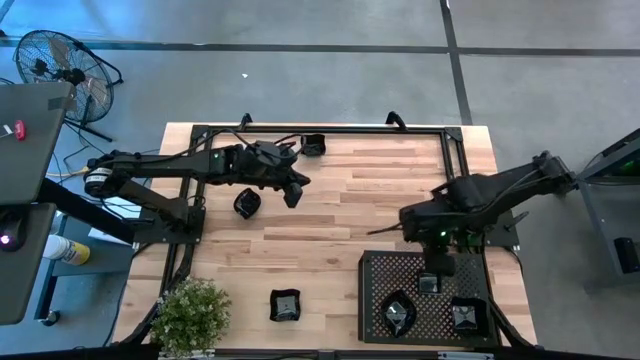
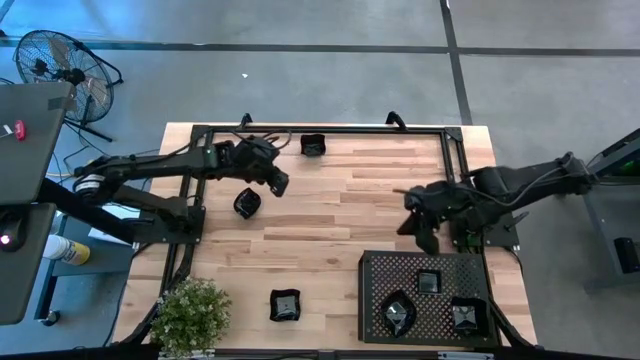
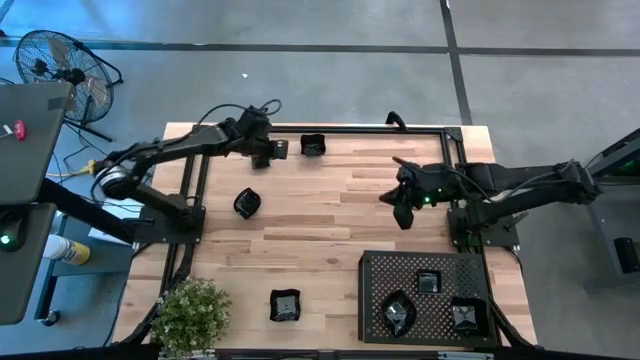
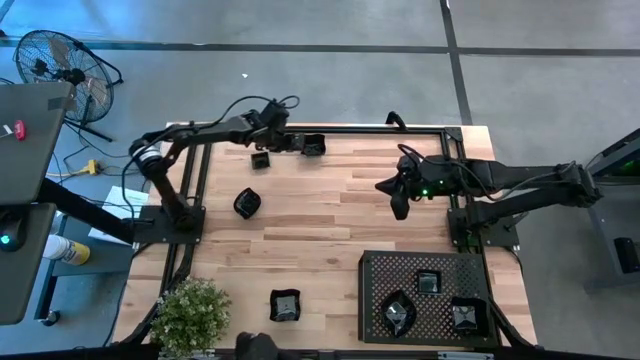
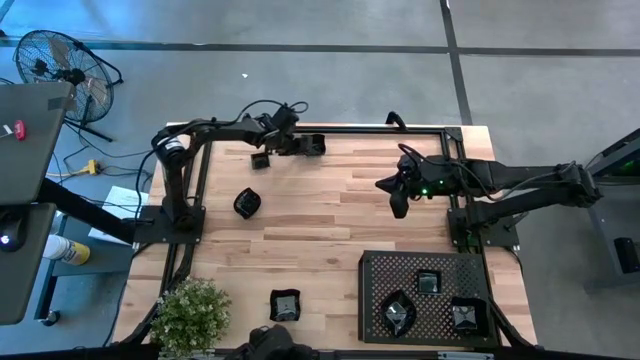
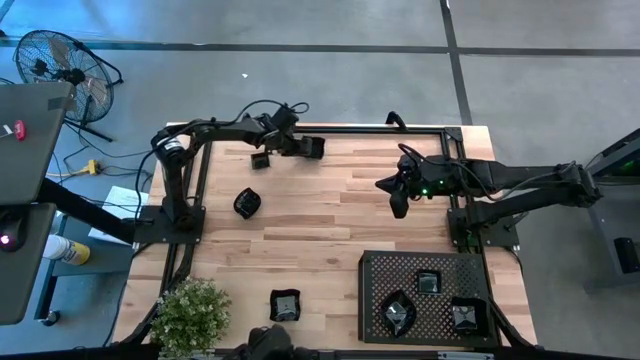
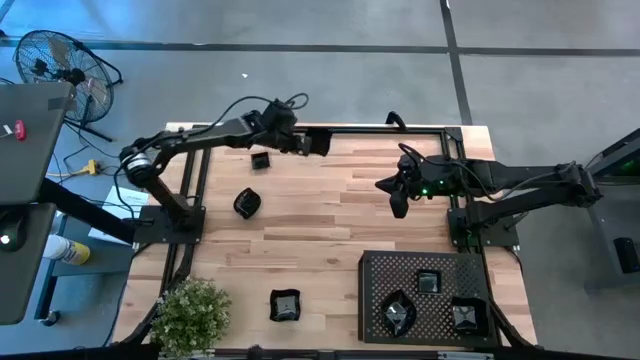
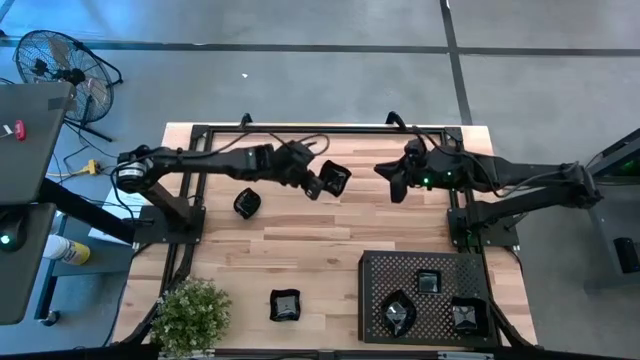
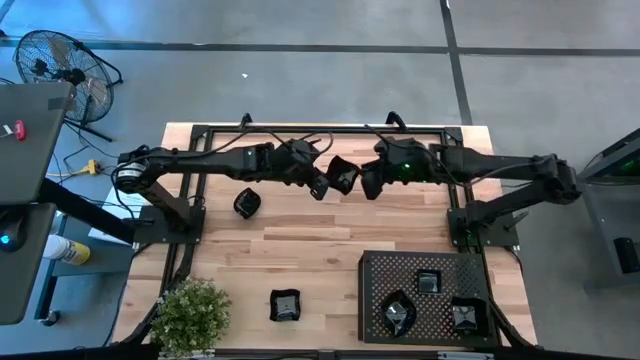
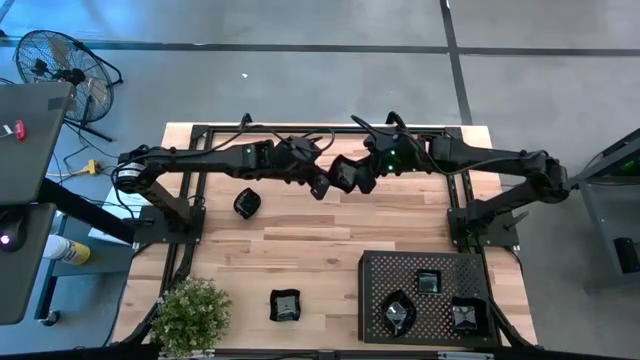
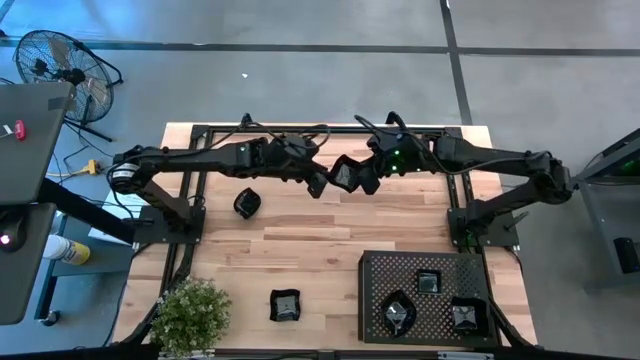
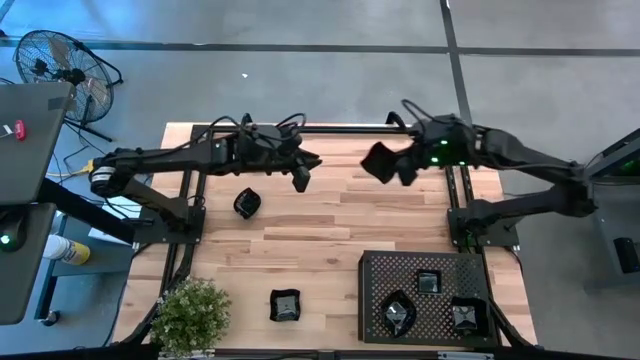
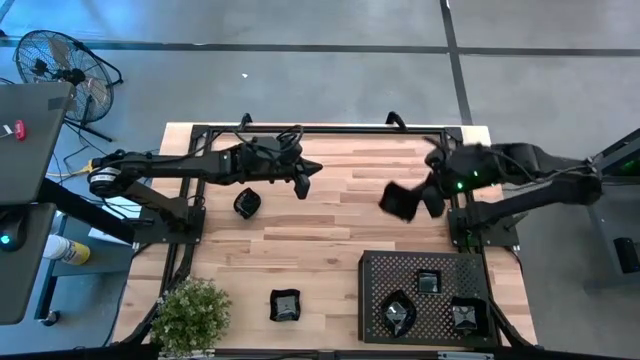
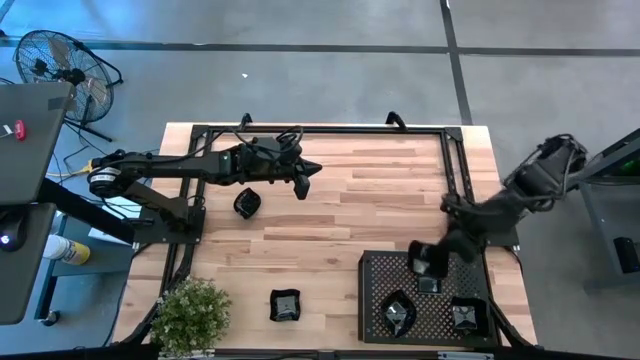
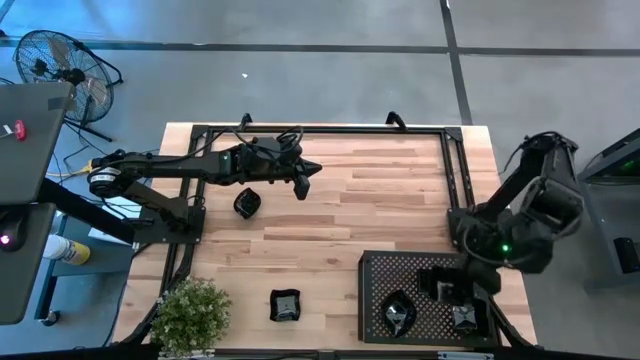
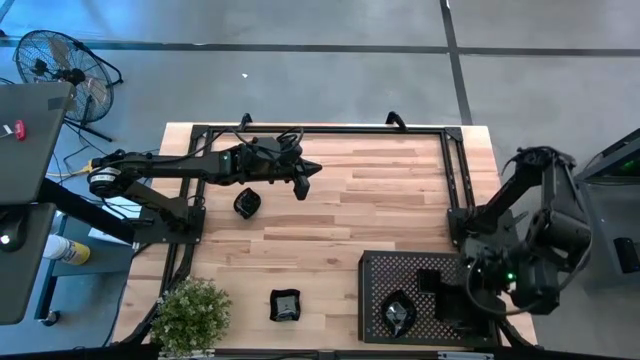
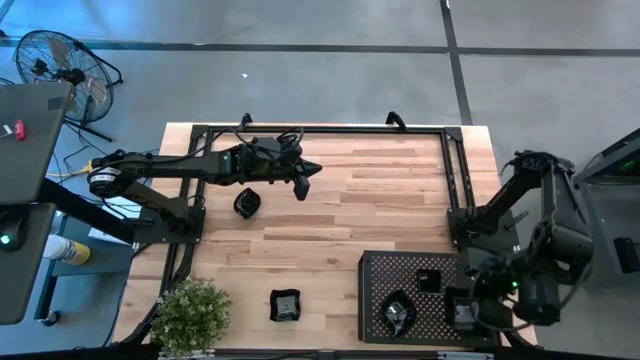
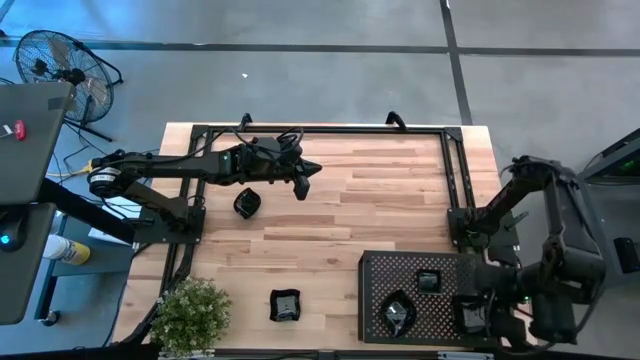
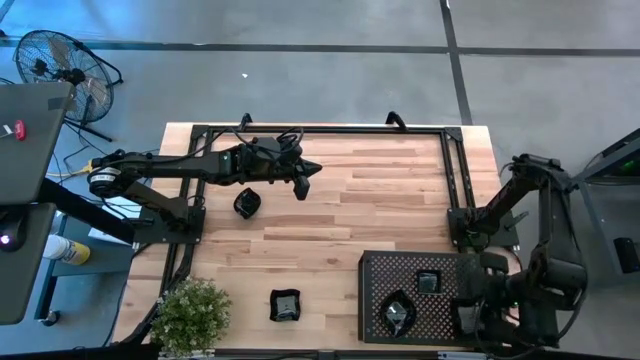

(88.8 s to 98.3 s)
Task: Pick & Place Mini shaped plates
Stack the black distorted square plate on top of the black distorted square plate on the shelf

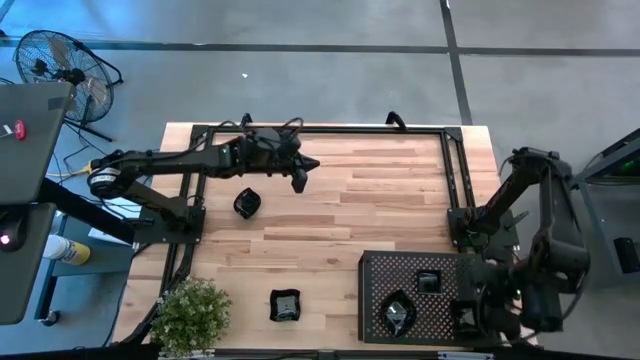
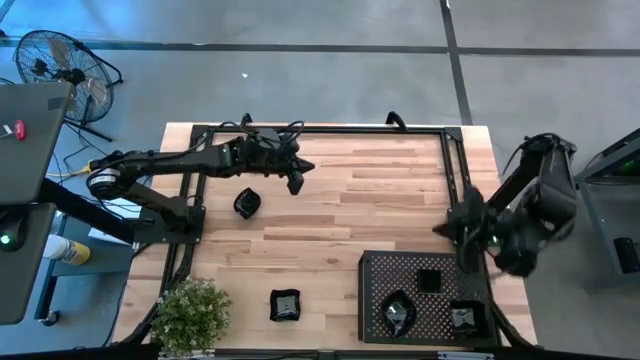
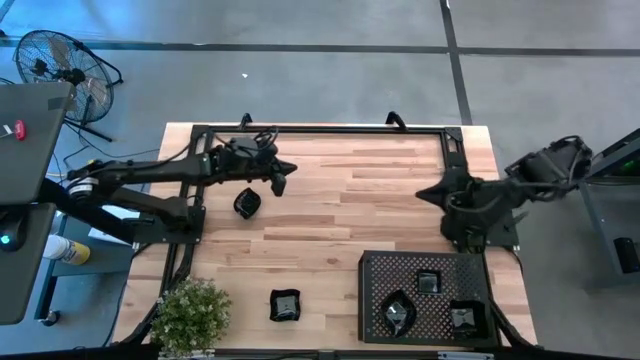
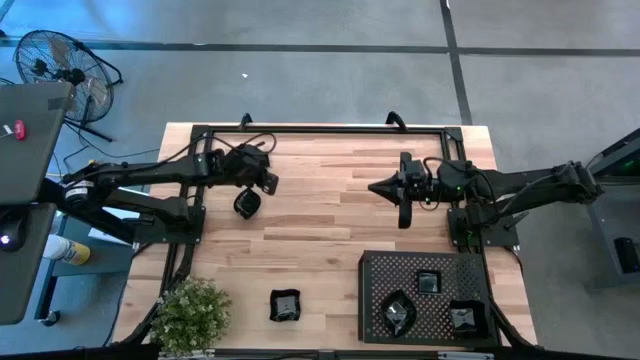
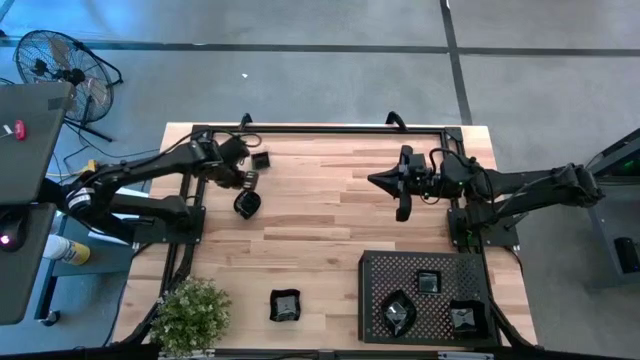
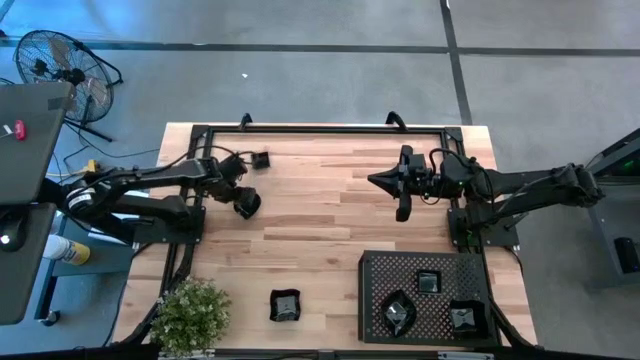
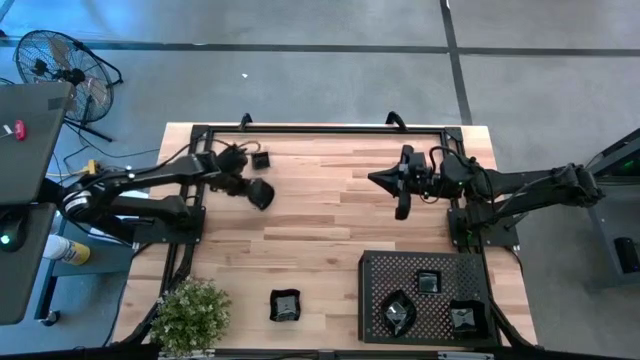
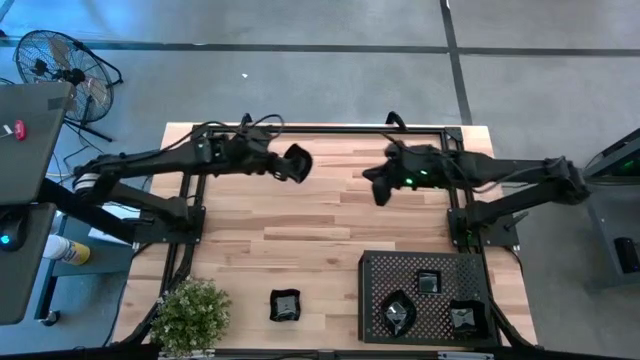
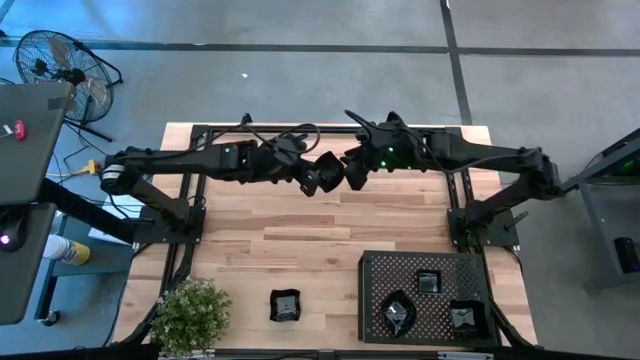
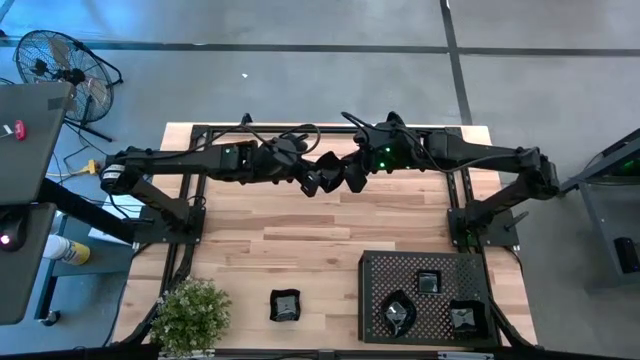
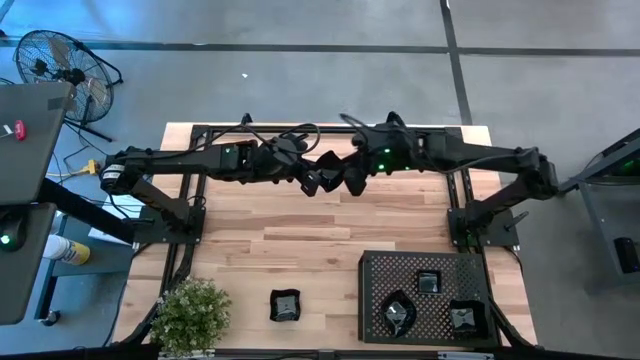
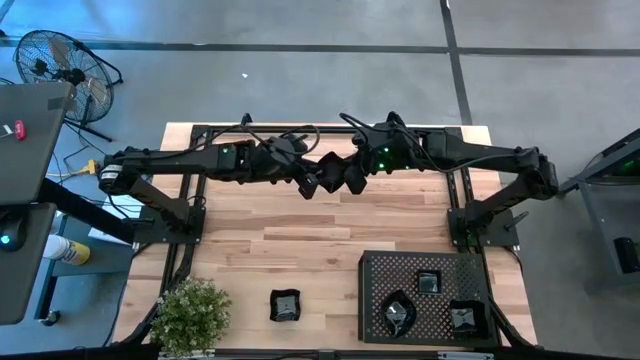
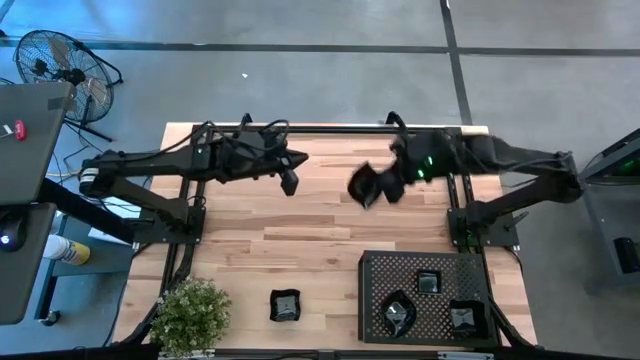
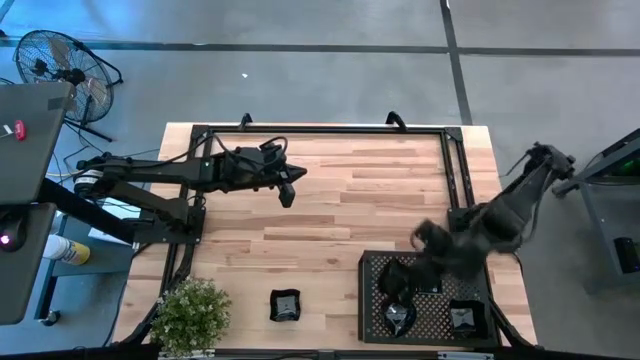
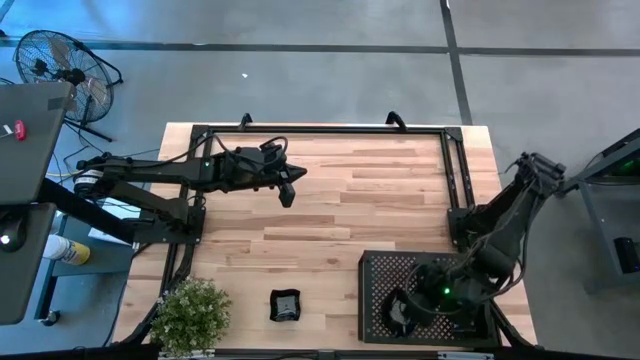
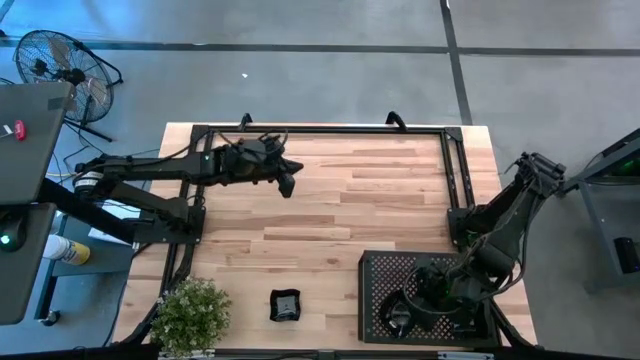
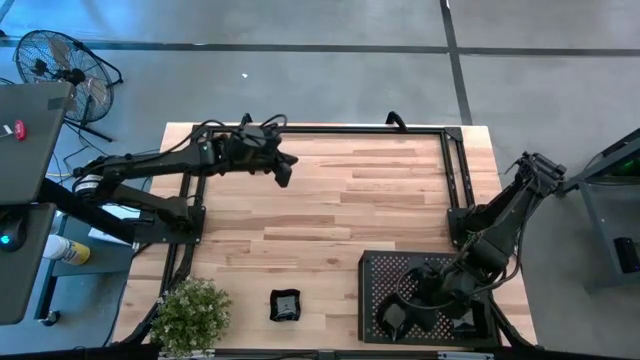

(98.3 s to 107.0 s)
Stack the black leaf-shaped plate on top of the black leaf-shaped plate on the shelf

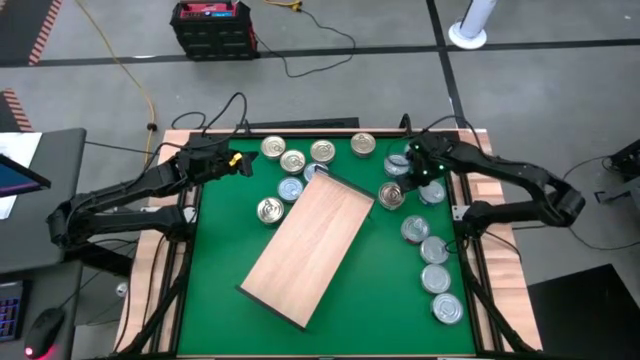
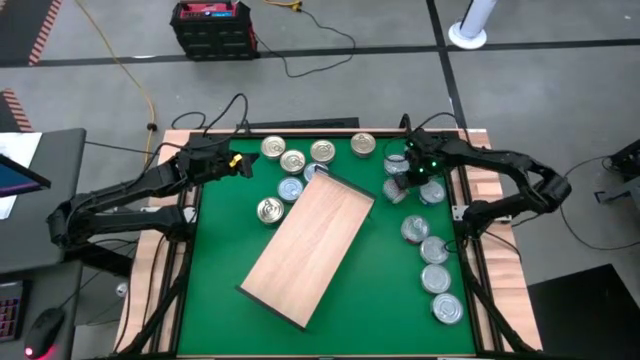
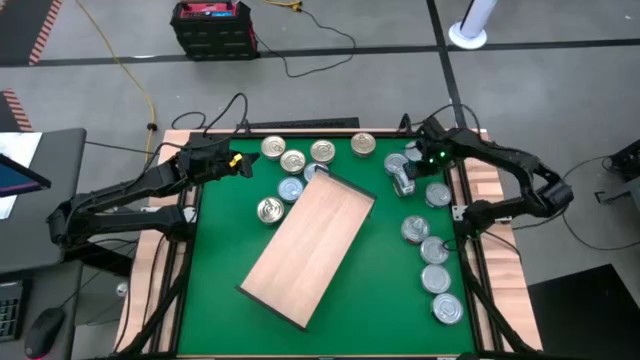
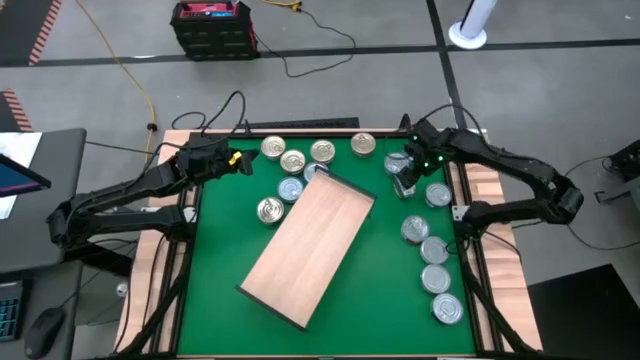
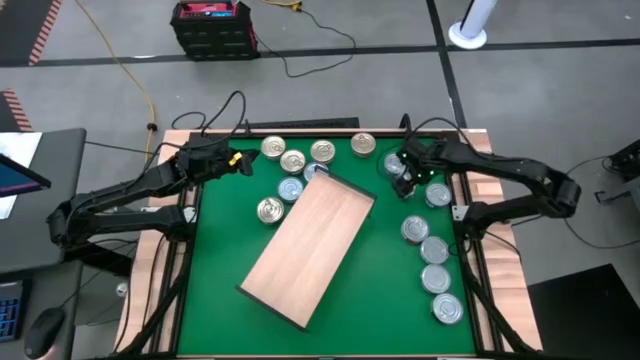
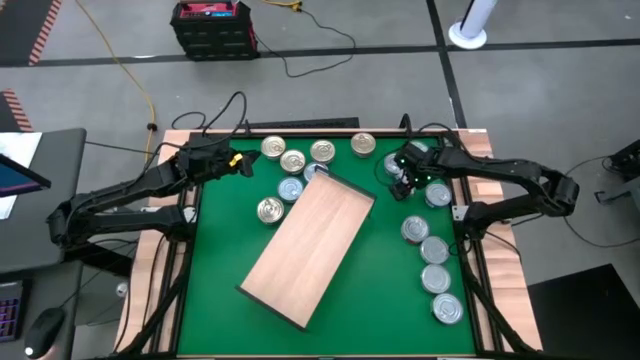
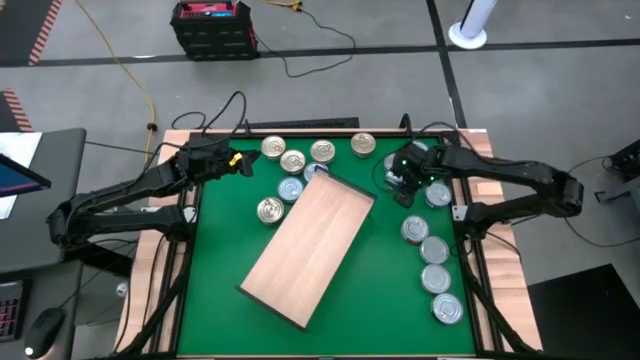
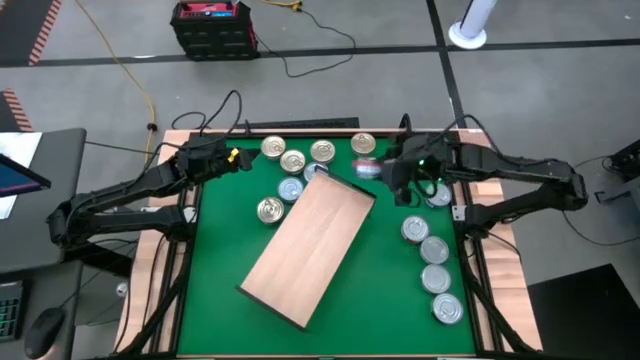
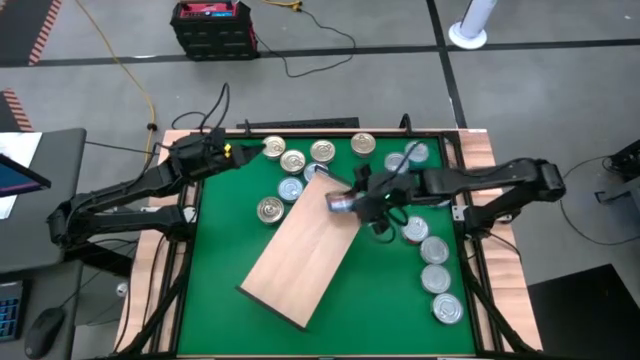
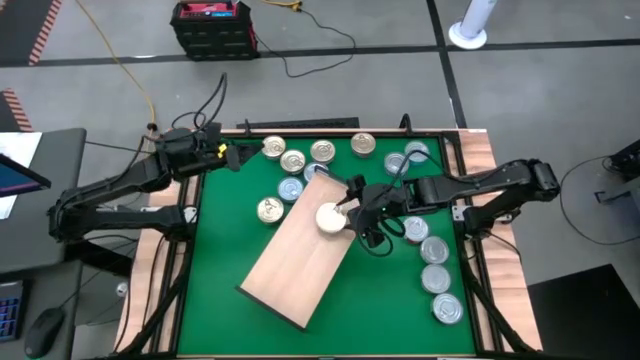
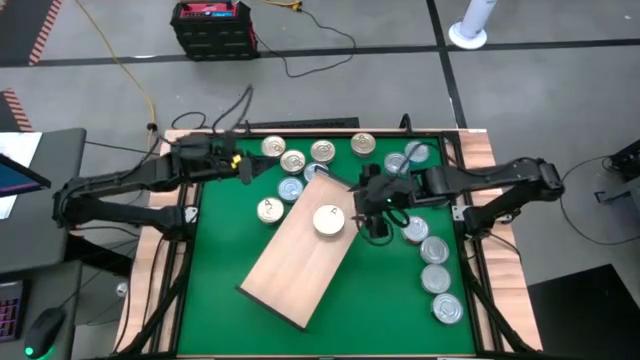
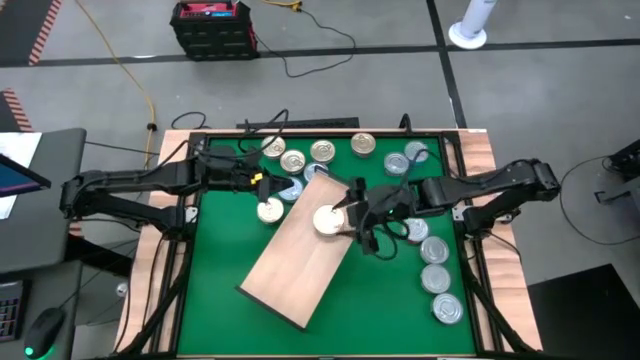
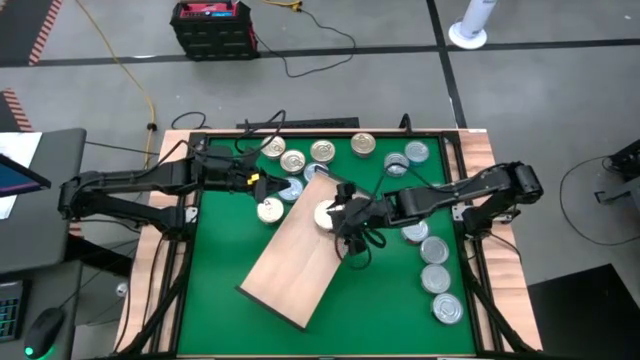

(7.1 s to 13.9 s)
Task: Stack canned seafood by type on shelf
Put the blue pink tuna can on the shelf
